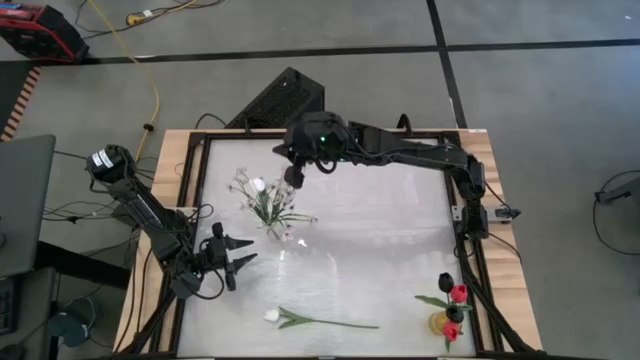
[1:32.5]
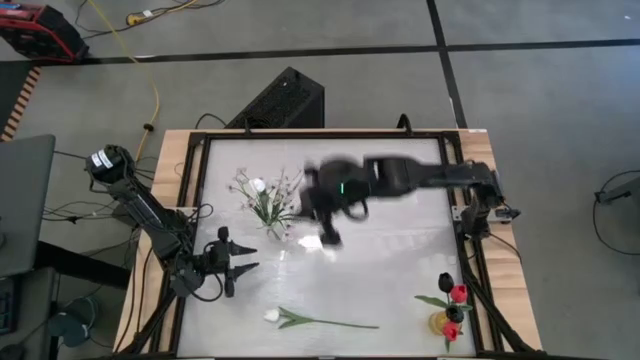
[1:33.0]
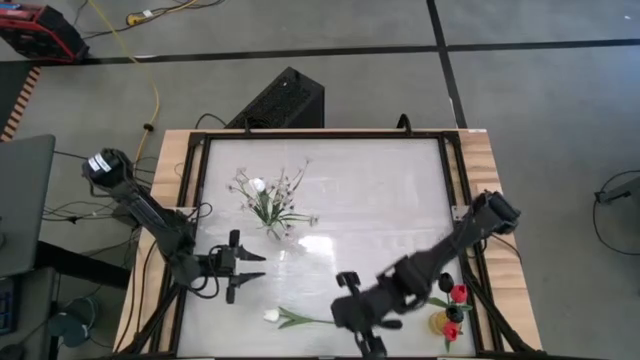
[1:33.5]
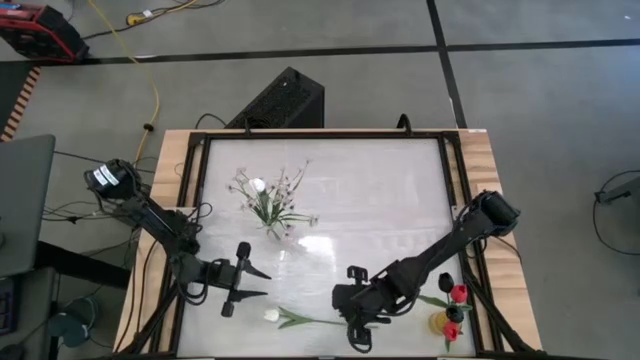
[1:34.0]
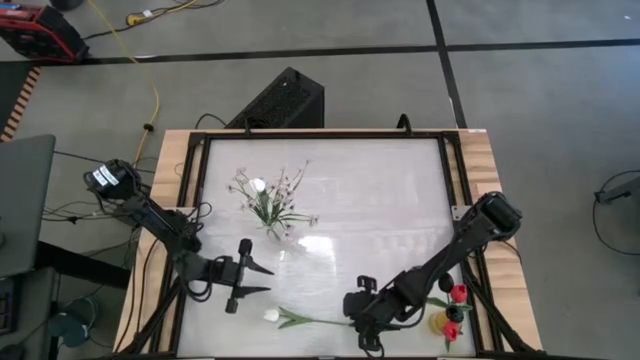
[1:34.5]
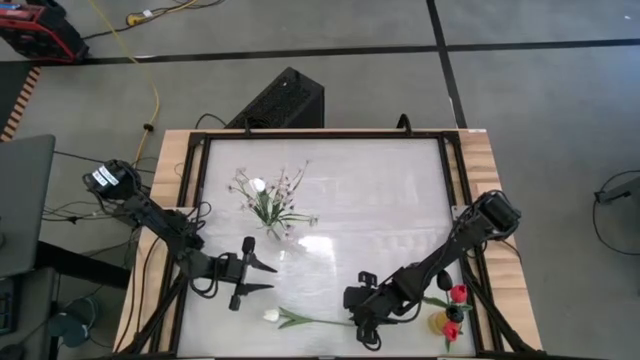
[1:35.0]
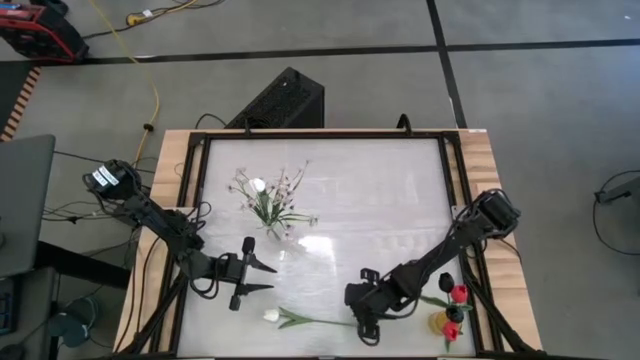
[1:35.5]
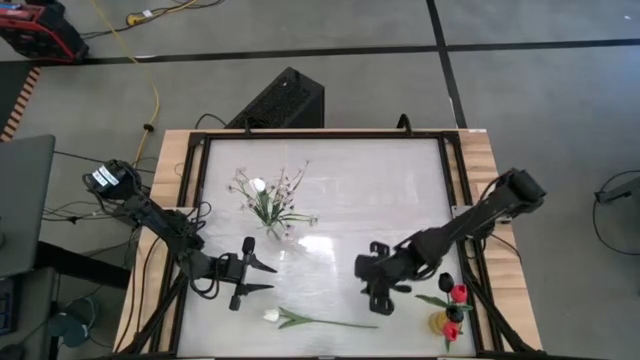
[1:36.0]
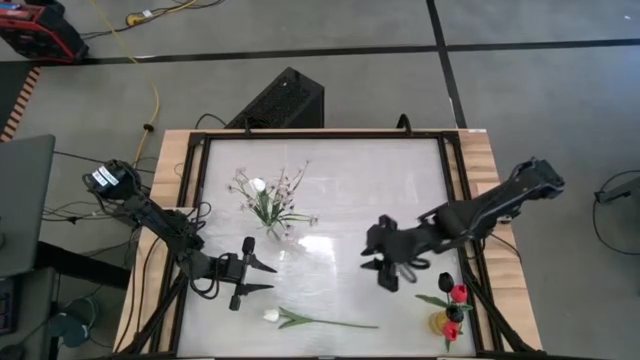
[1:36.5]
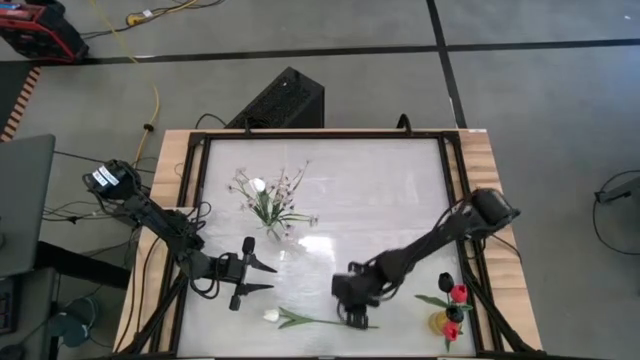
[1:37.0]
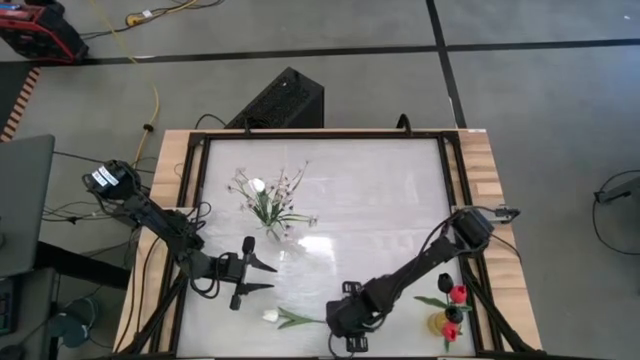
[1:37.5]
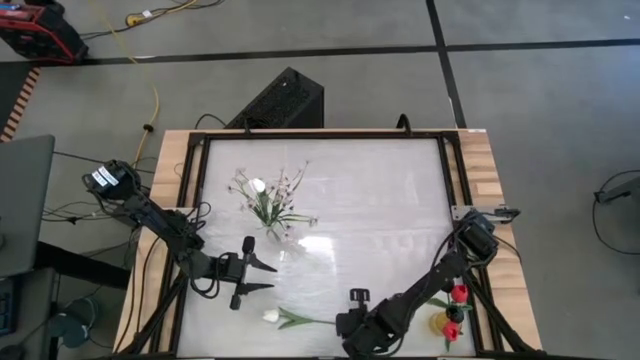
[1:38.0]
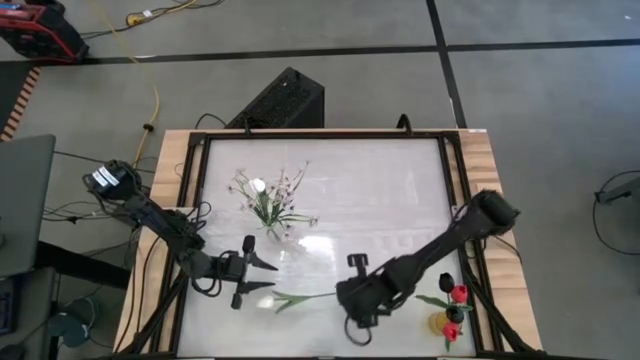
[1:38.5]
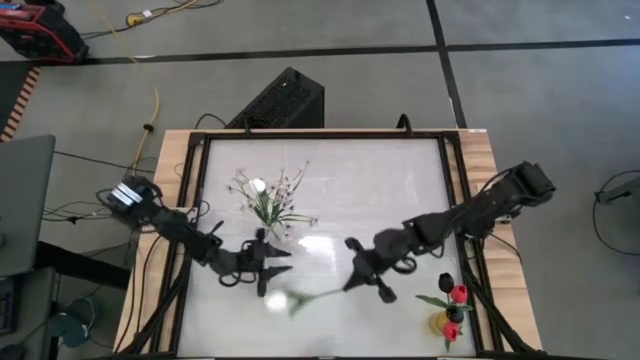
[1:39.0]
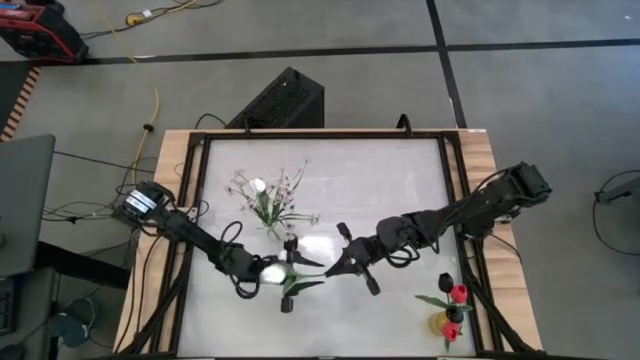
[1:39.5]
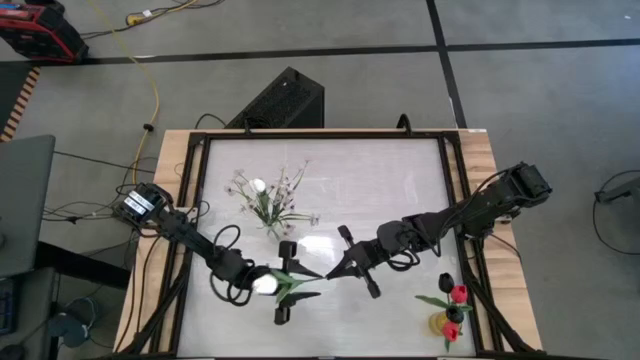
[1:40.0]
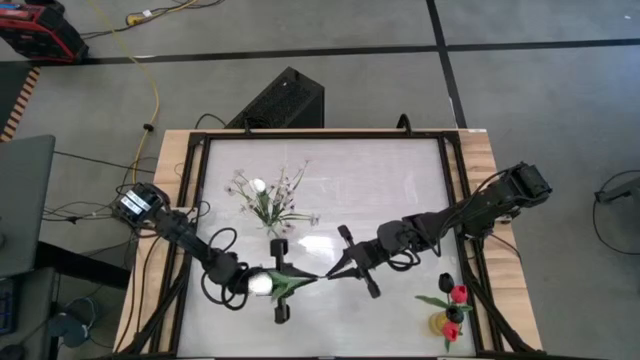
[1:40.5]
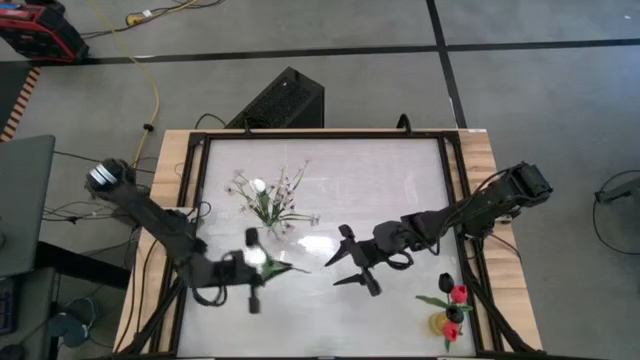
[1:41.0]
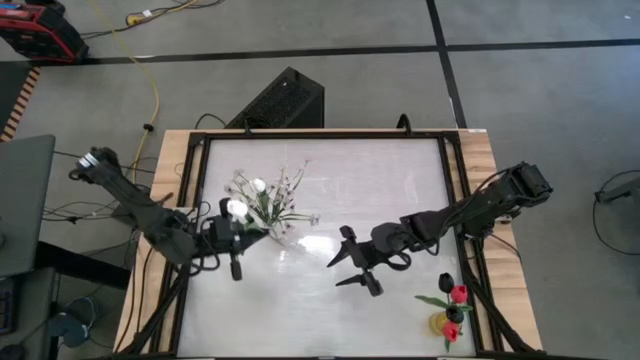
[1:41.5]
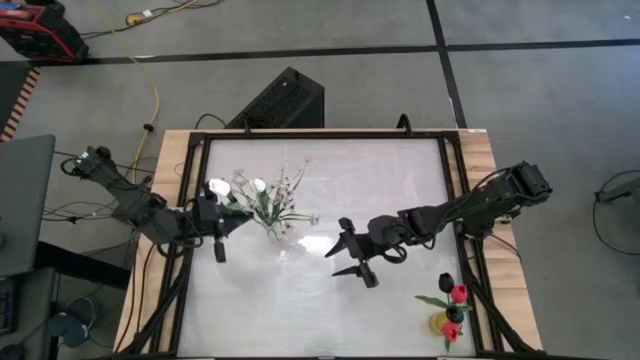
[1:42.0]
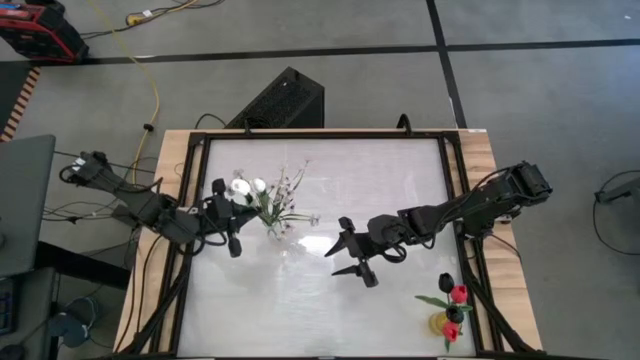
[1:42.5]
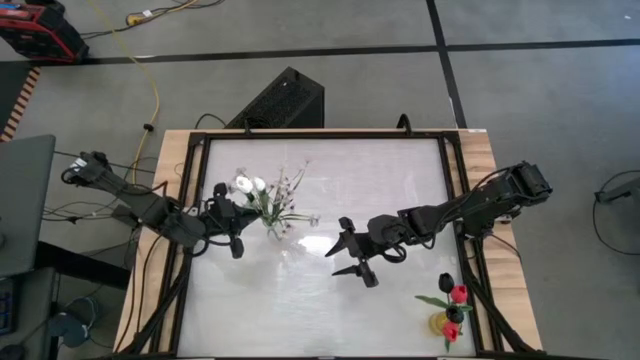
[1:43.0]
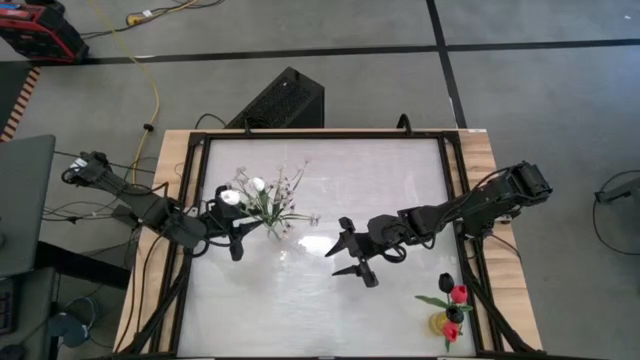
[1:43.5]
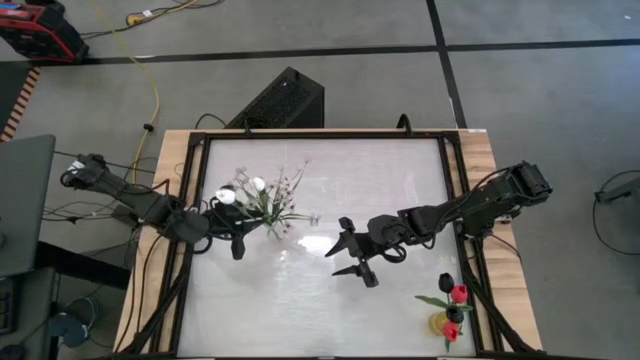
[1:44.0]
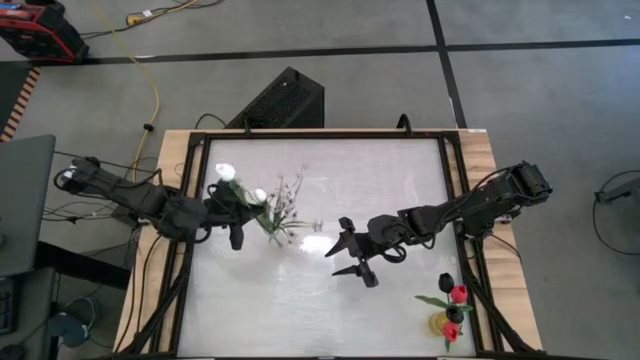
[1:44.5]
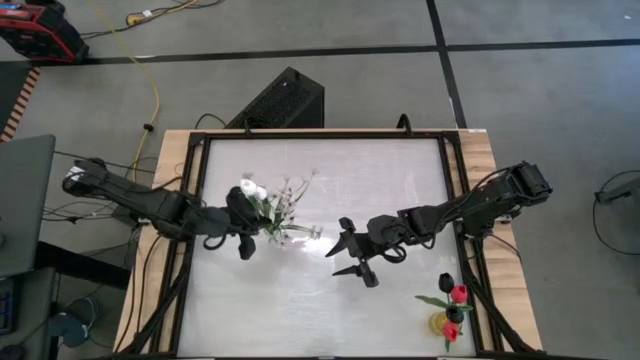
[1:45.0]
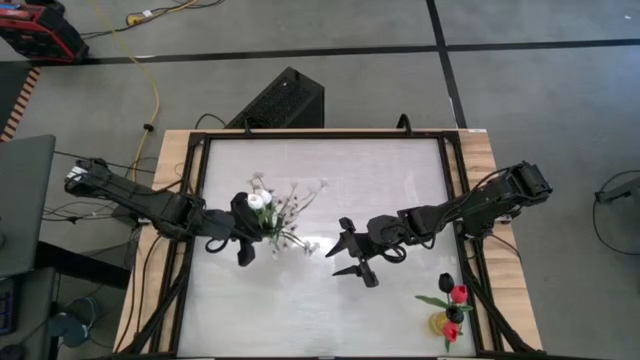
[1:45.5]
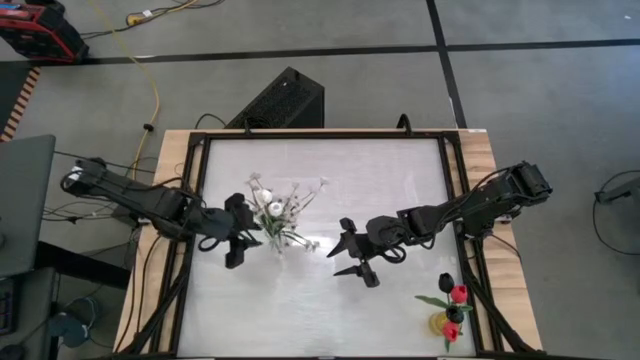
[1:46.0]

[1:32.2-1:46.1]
Task: Sort flowers into vase by color
Put the white flower into the transparent vase

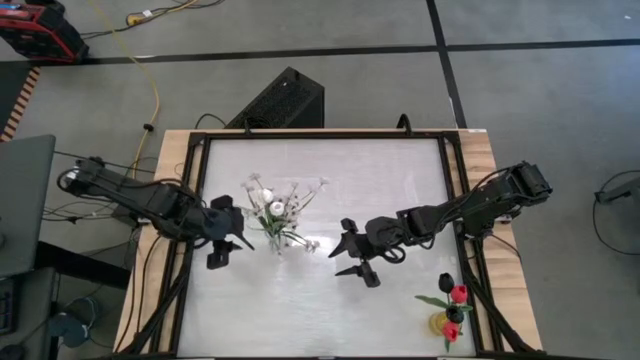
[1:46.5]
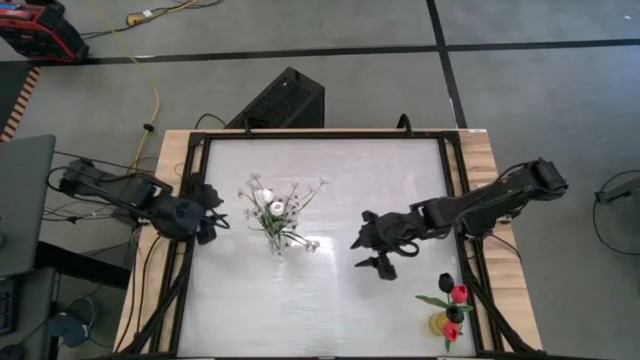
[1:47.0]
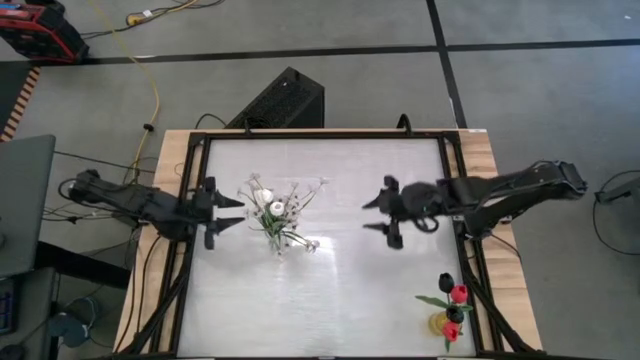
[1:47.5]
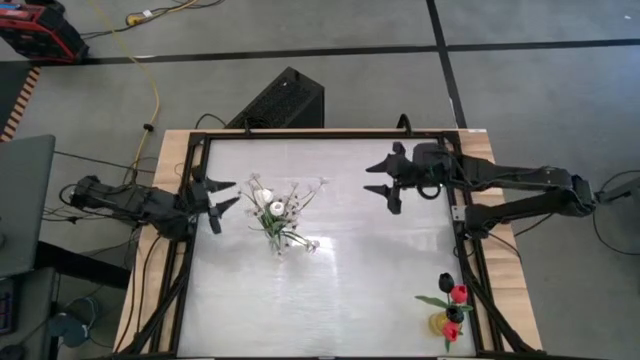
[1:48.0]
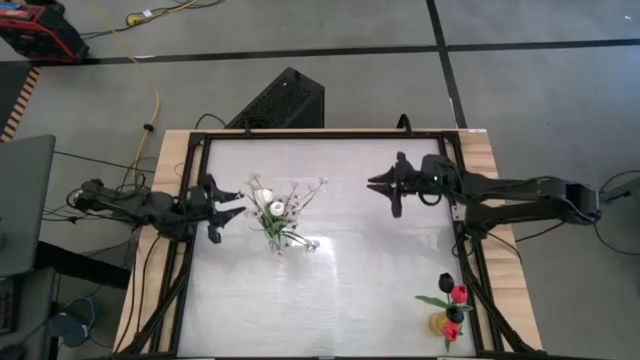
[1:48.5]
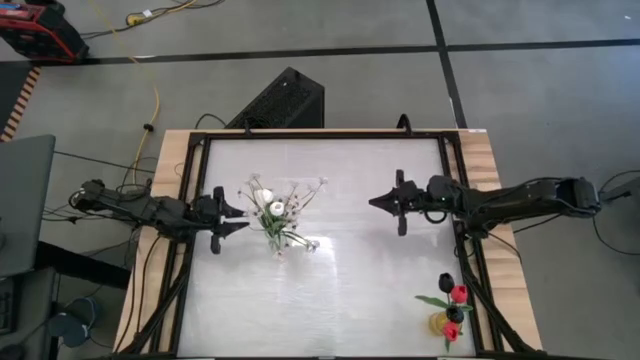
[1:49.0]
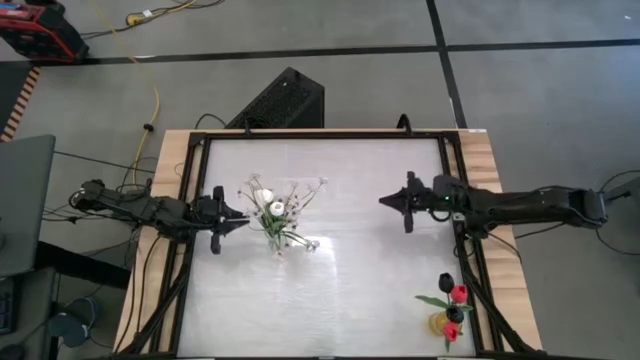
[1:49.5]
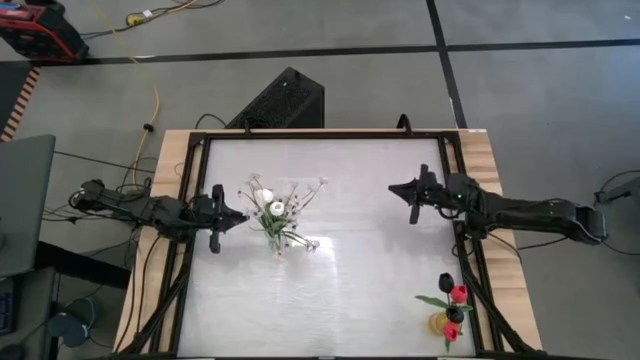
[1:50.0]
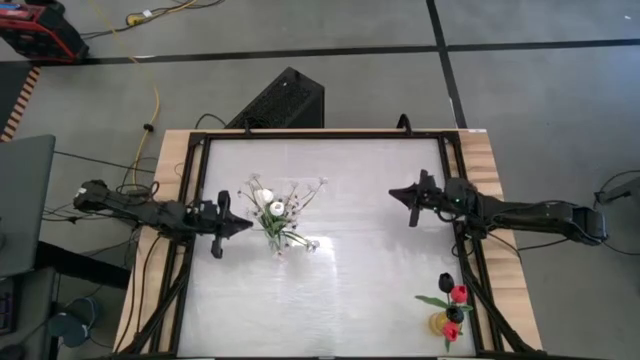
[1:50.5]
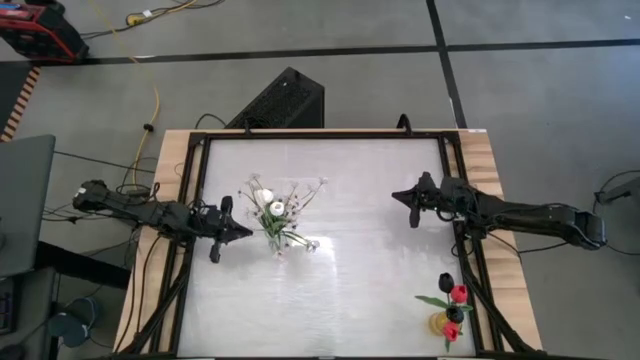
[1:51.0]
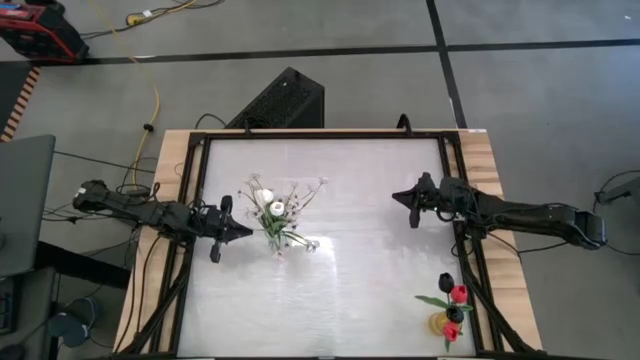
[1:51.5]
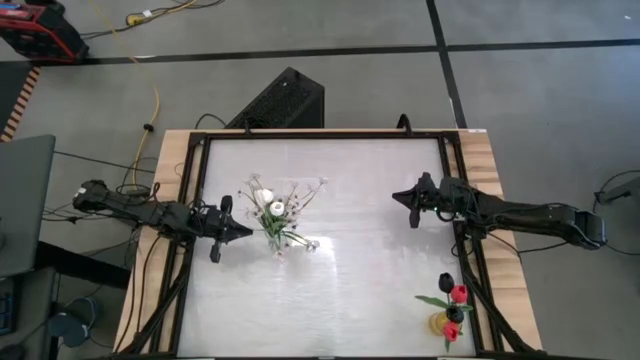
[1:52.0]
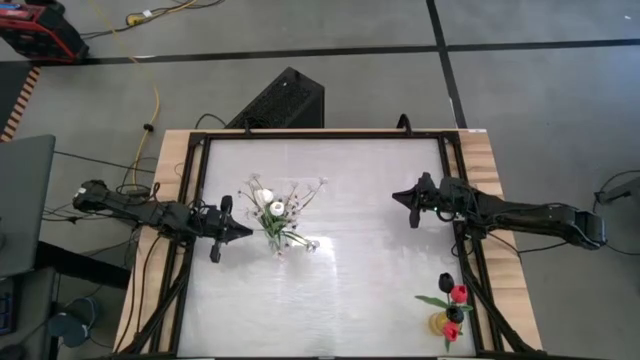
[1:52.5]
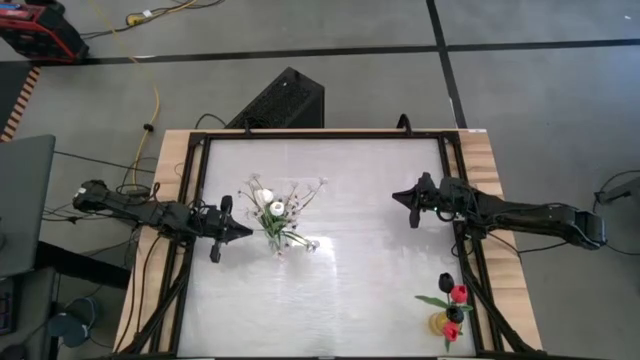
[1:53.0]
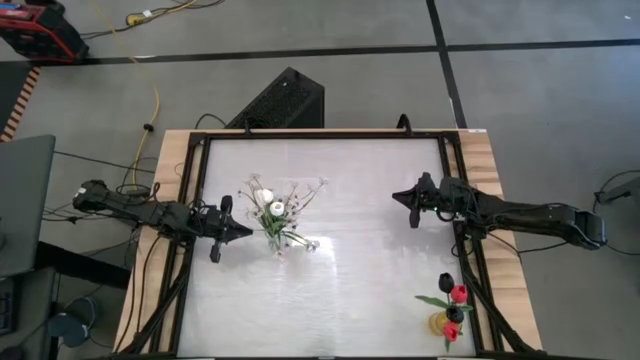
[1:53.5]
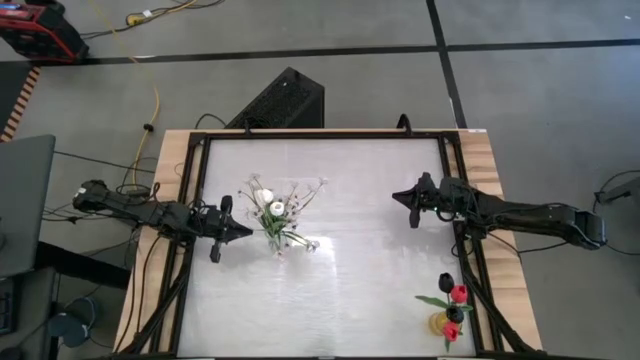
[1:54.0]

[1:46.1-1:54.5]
Return to Home Position
